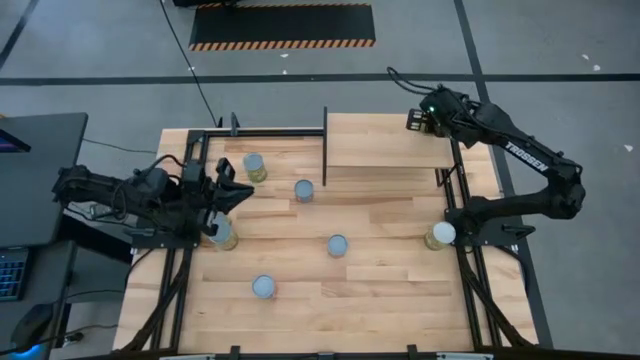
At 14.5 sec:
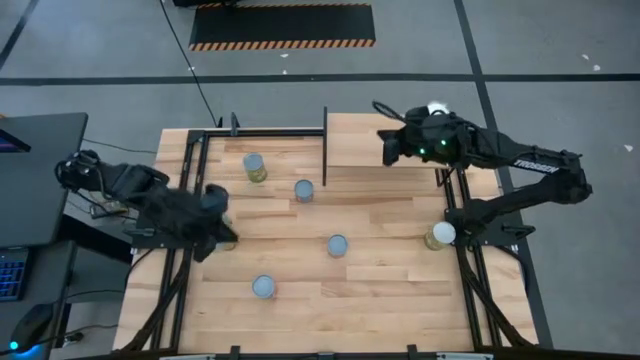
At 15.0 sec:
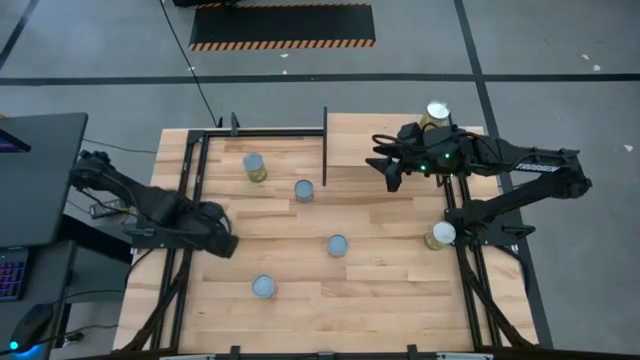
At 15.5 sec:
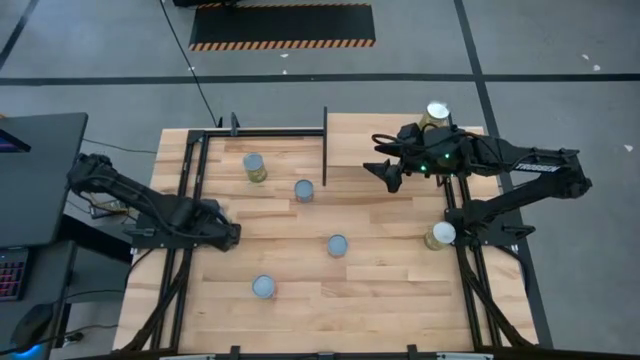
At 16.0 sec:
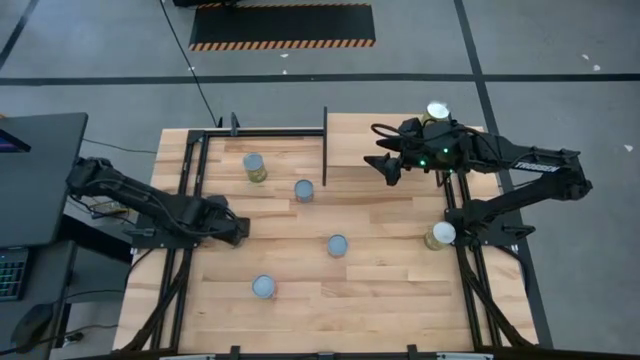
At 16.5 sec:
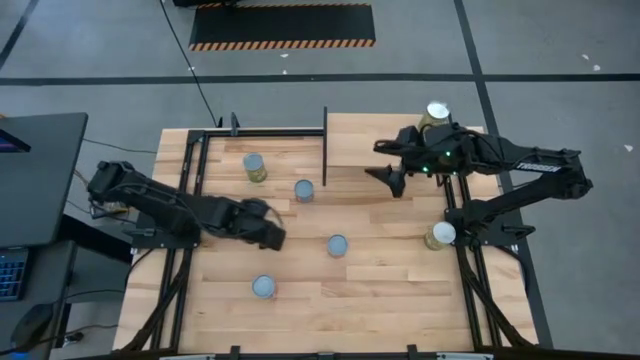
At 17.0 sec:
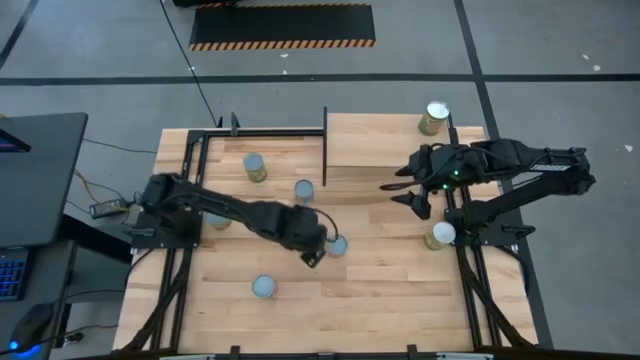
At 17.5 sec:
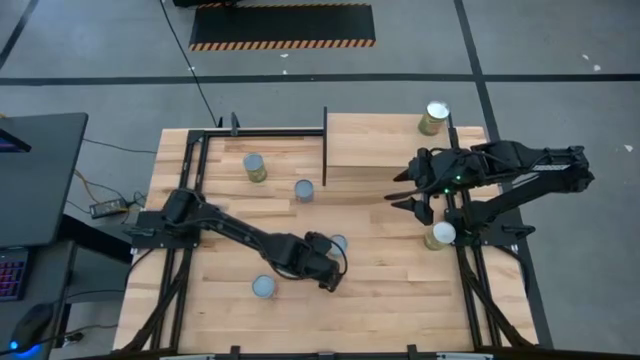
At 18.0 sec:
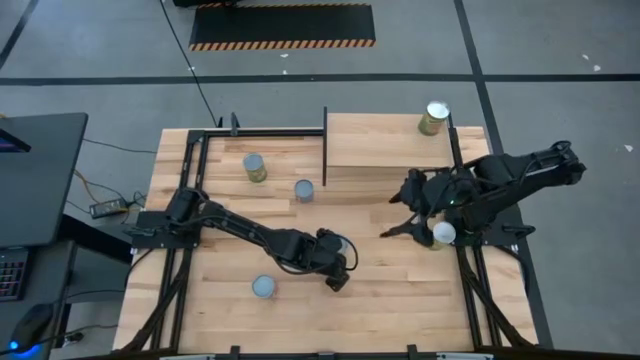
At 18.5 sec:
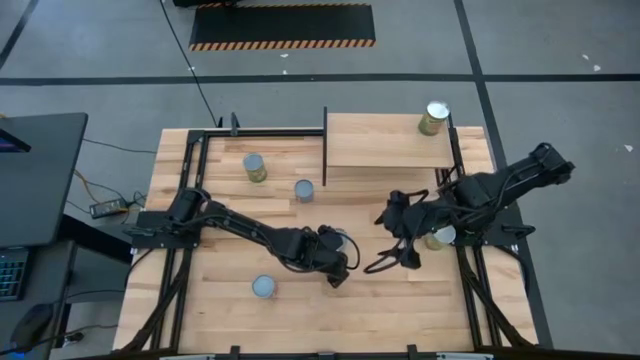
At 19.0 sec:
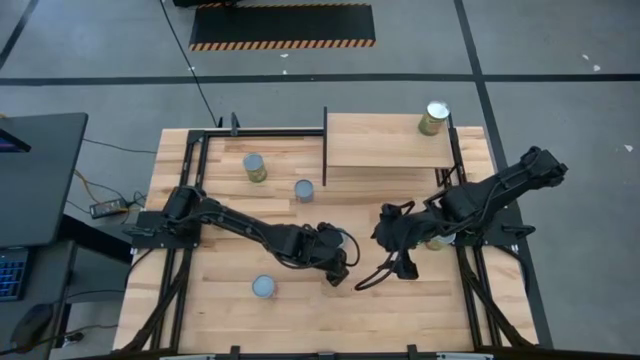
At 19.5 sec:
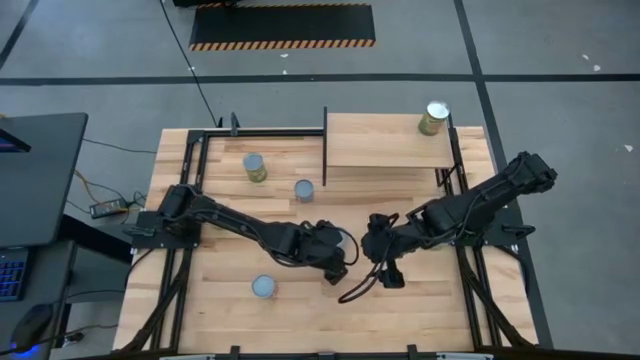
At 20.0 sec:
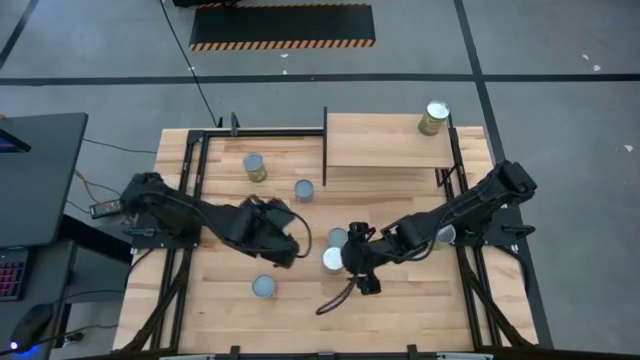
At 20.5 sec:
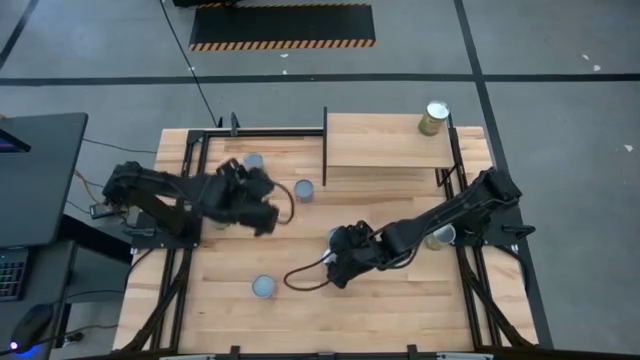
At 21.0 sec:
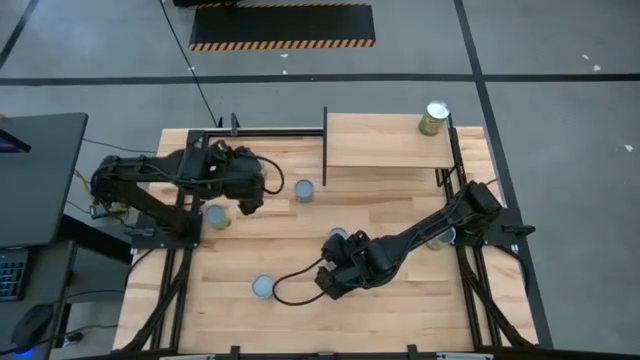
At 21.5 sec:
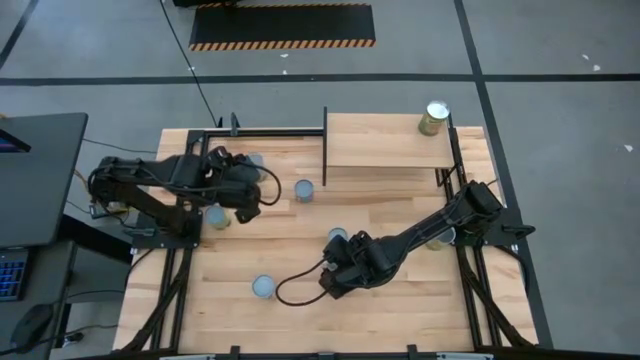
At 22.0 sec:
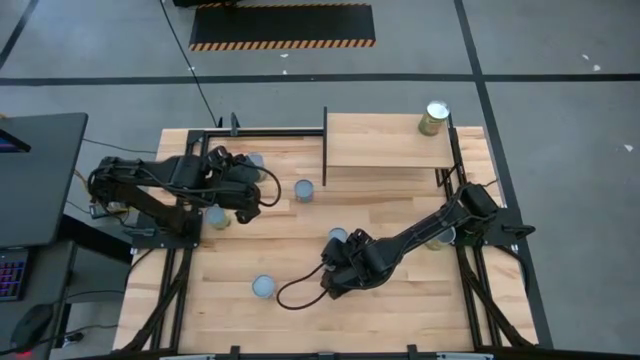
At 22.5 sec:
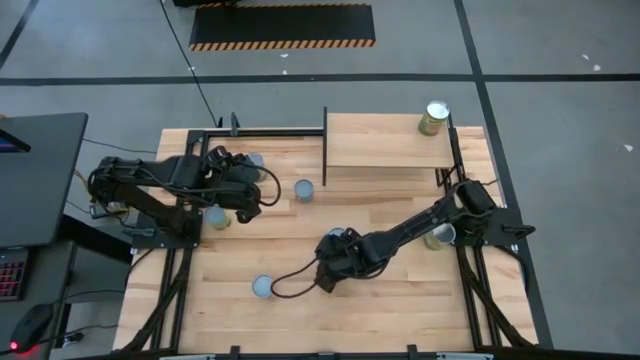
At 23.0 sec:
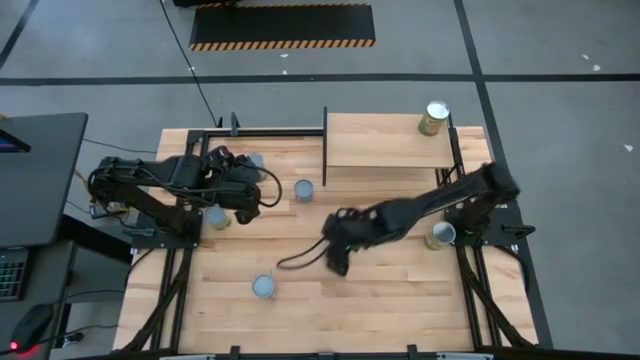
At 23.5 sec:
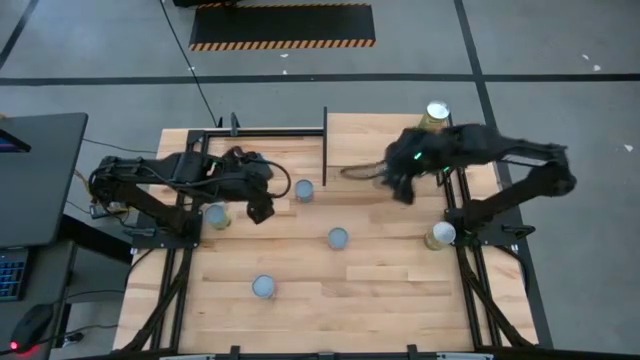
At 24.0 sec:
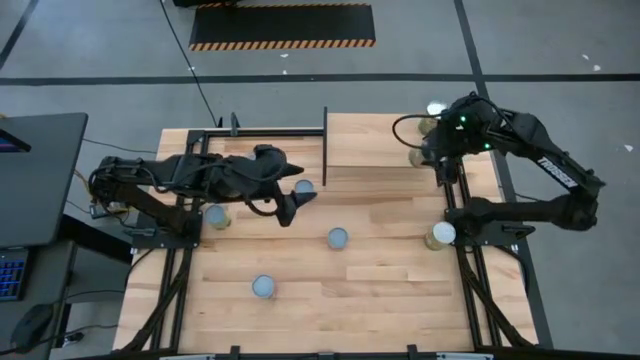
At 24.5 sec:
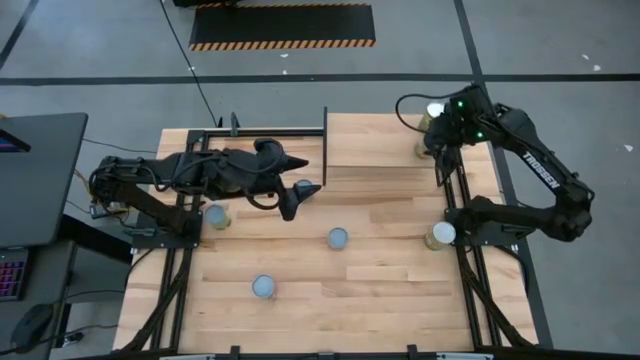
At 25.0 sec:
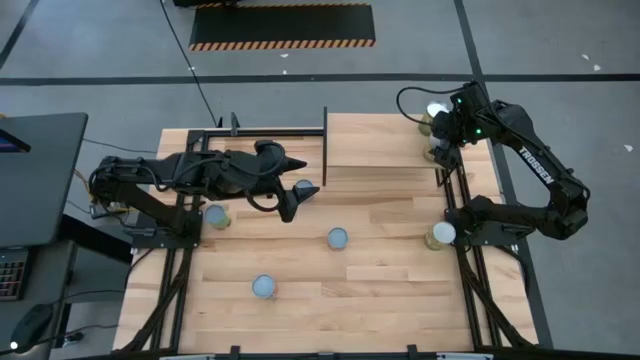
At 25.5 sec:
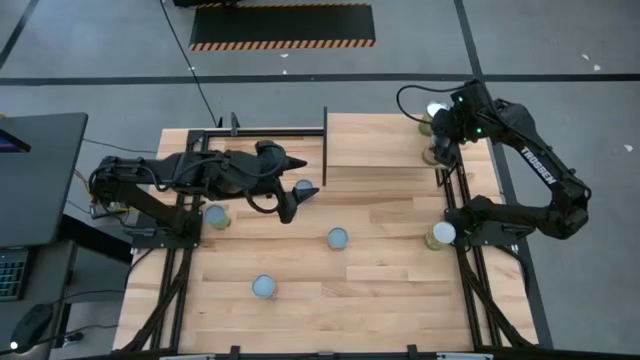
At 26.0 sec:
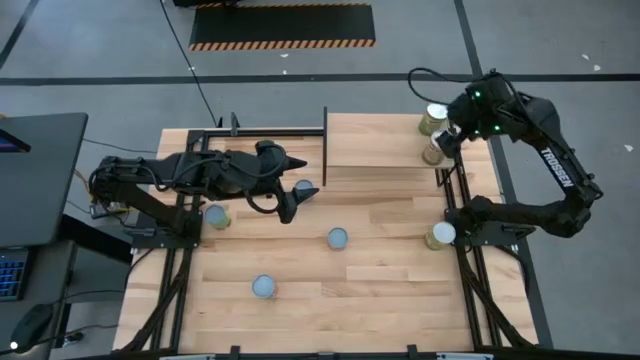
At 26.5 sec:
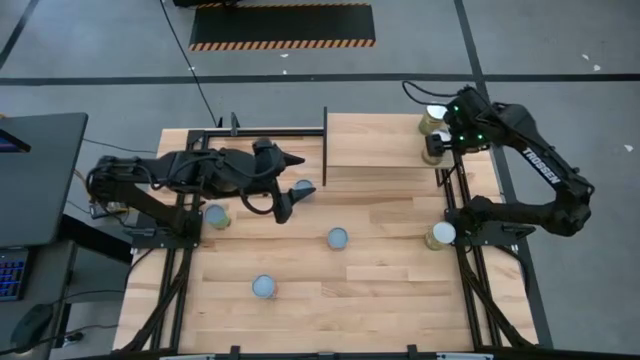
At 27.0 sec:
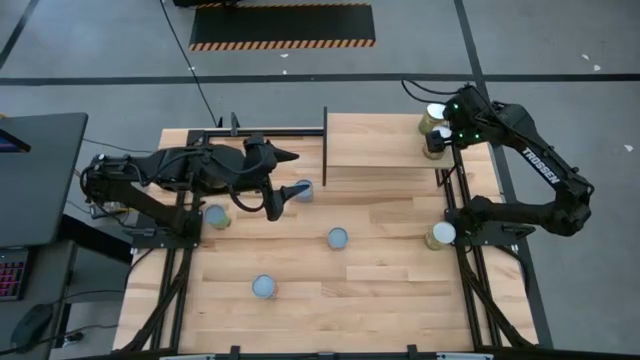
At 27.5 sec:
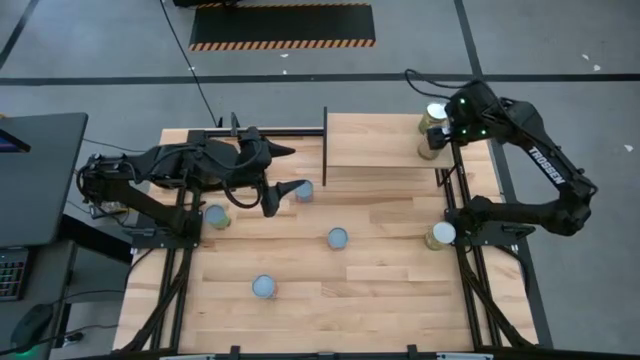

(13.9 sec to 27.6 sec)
Task: Pick and place cans onto a shelf
Put the large canned oranges on the shelf

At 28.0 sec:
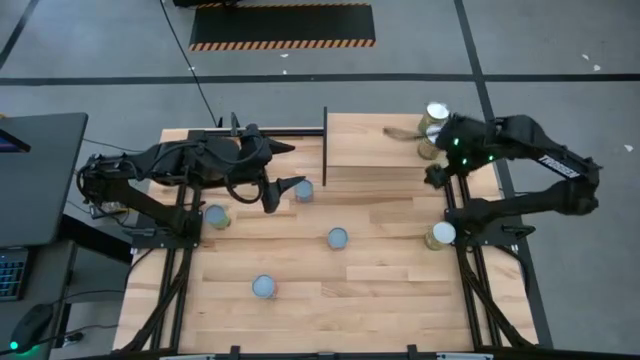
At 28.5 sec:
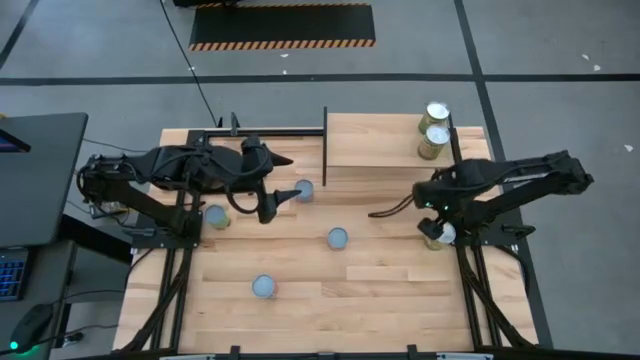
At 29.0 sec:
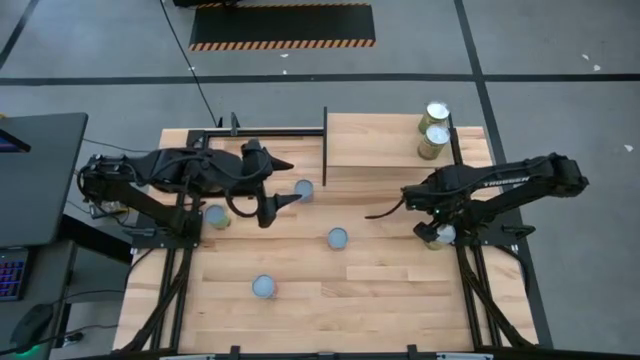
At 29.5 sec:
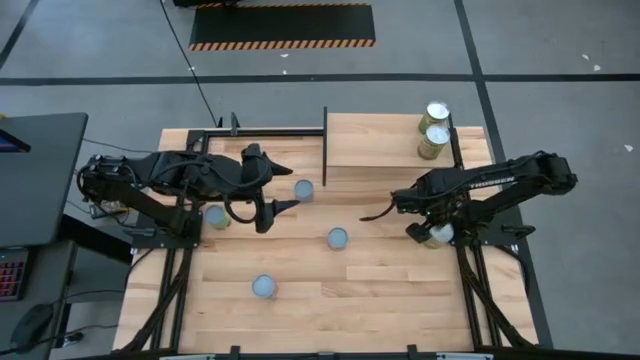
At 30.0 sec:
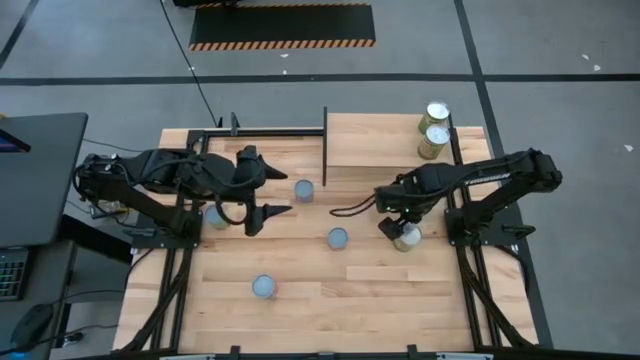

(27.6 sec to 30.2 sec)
Put the right large canned pears on the shelf

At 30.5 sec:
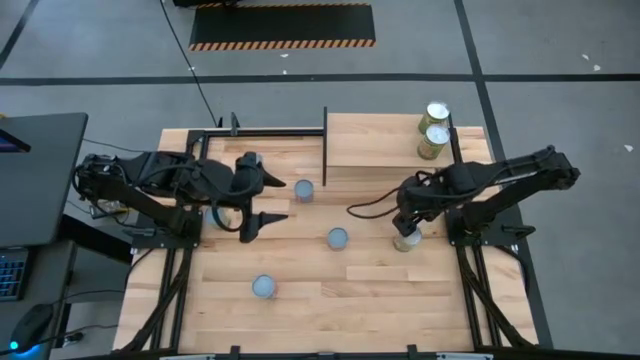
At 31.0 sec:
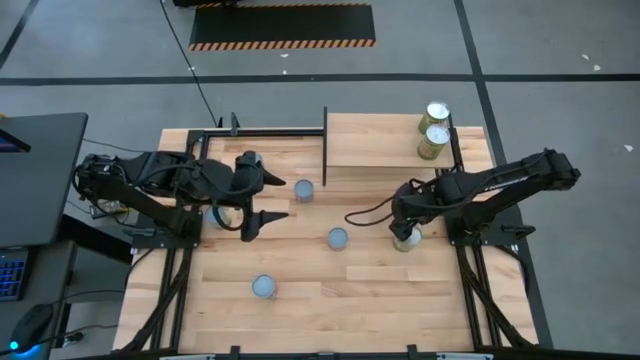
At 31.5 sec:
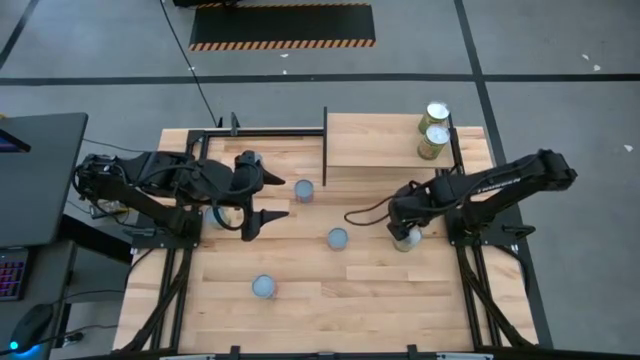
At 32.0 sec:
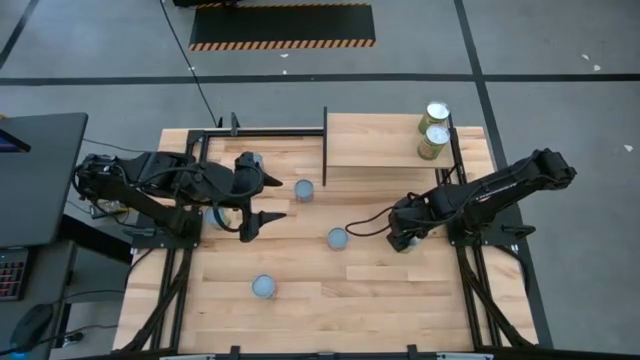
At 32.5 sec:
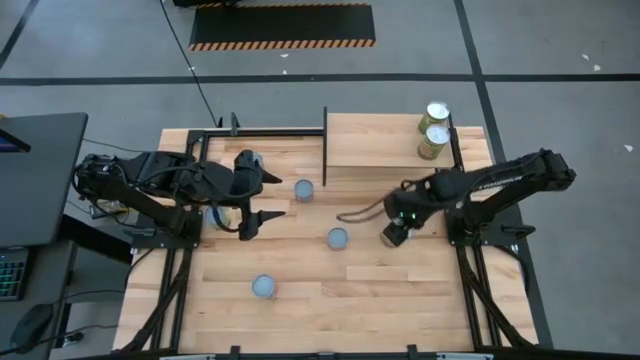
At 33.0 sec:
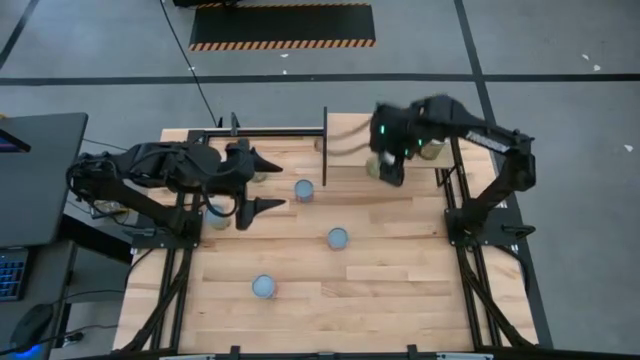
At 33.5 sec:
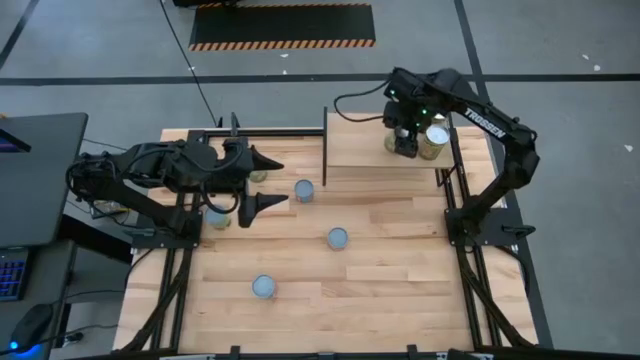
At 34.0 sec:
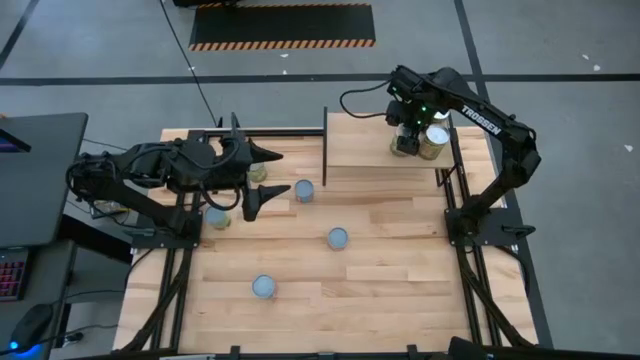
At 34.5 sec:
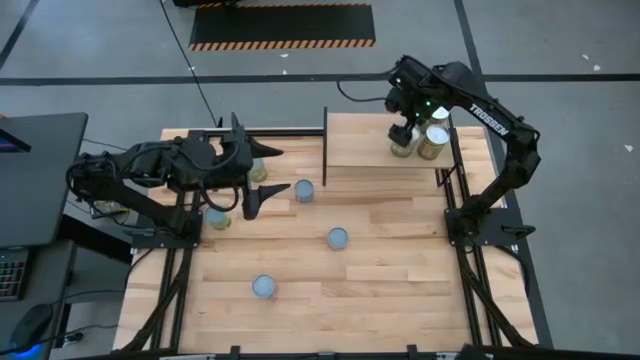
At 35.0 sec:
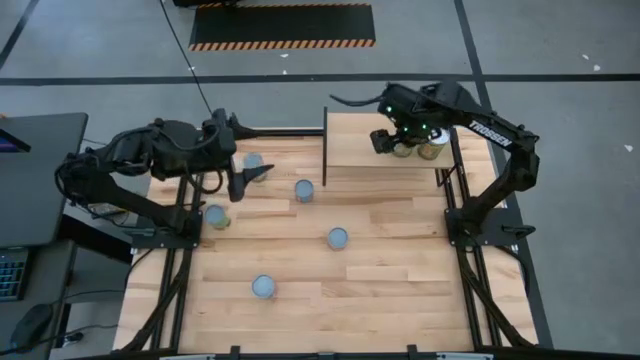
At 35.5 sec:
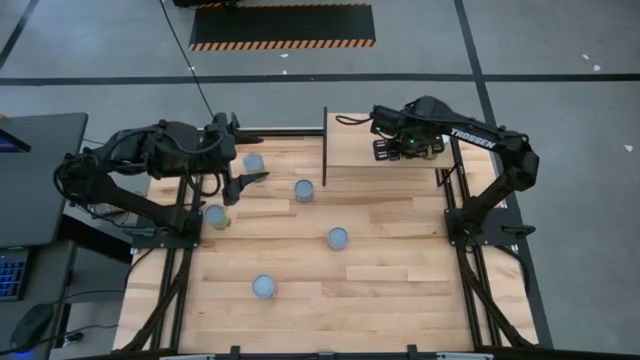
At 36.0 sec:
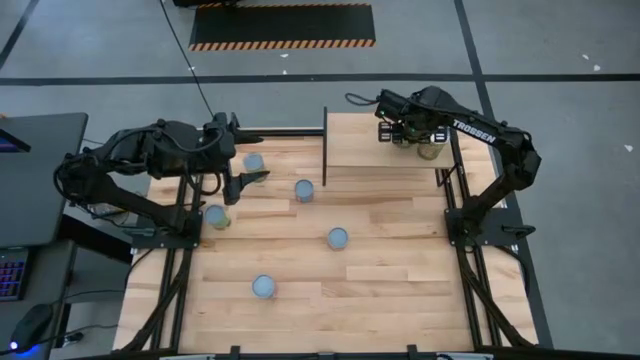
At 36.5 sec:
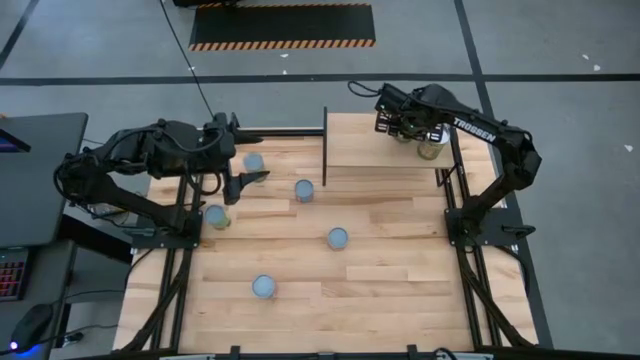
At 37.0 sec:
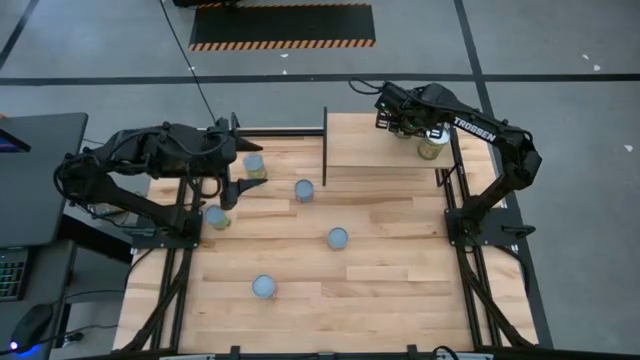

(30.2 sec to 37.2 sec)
Put the right large canned pears on the shelf
